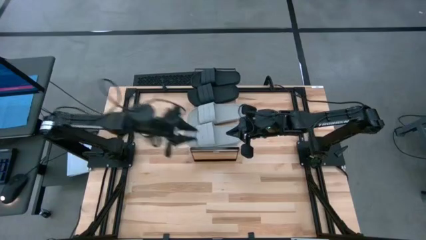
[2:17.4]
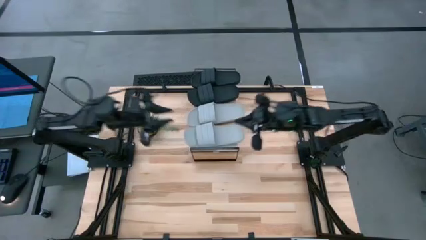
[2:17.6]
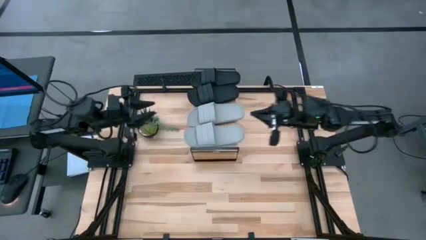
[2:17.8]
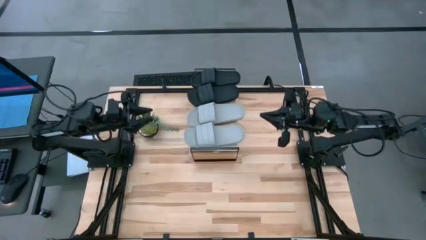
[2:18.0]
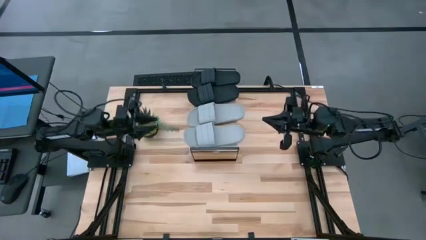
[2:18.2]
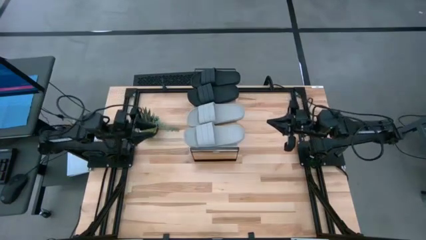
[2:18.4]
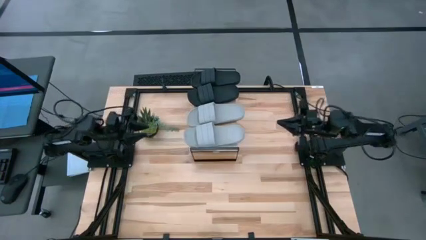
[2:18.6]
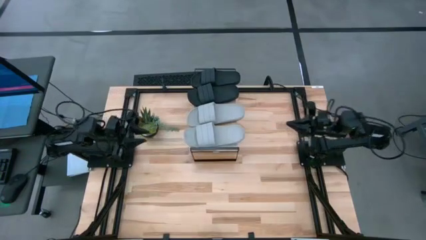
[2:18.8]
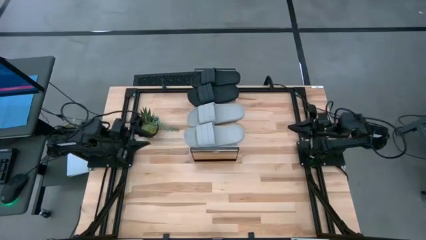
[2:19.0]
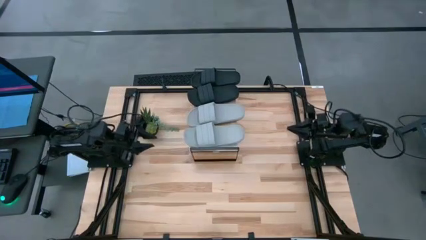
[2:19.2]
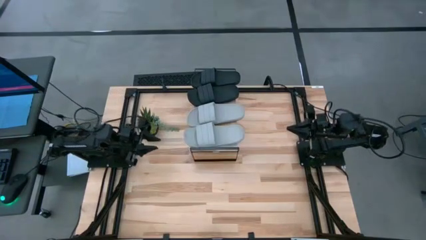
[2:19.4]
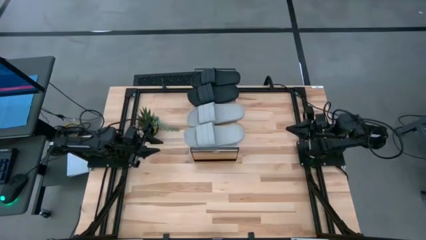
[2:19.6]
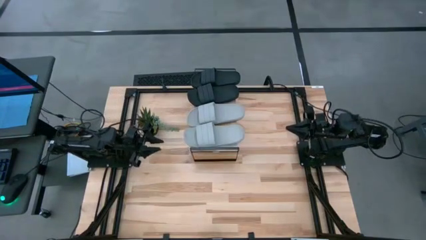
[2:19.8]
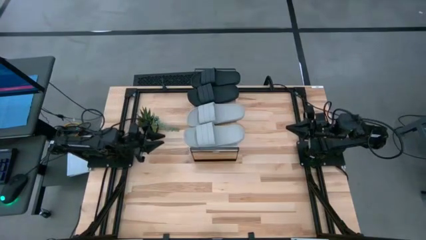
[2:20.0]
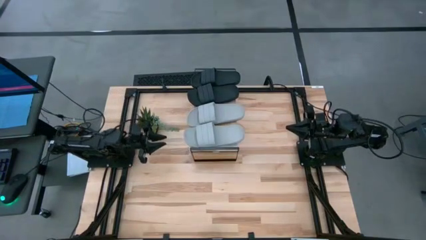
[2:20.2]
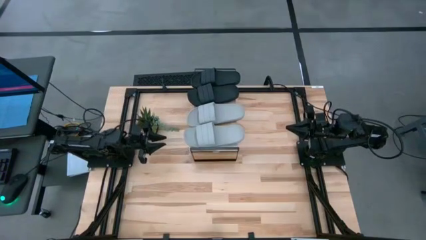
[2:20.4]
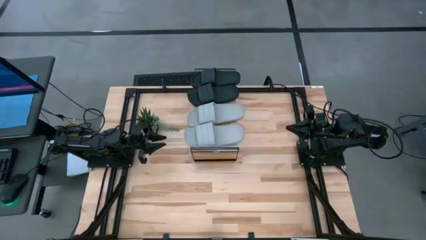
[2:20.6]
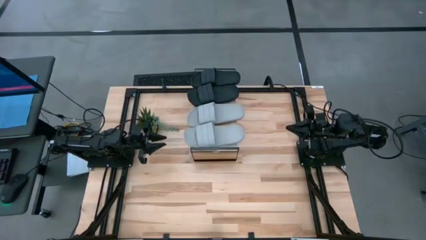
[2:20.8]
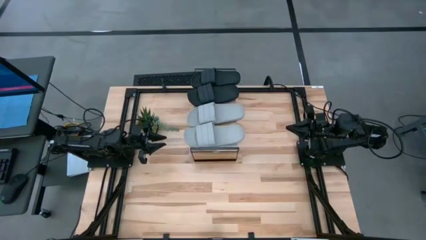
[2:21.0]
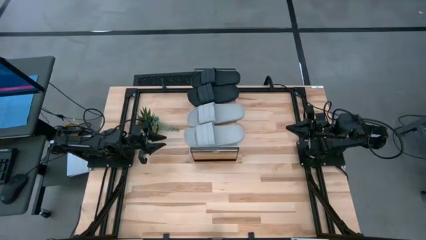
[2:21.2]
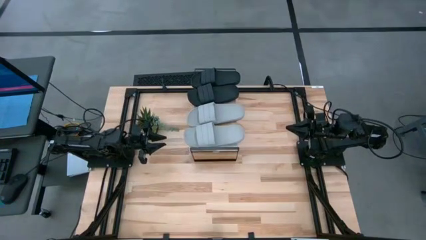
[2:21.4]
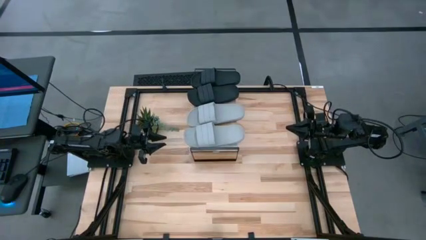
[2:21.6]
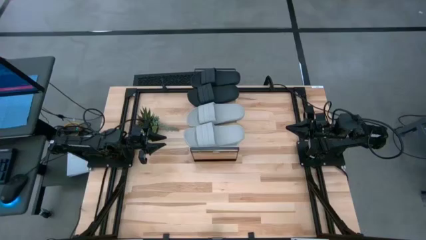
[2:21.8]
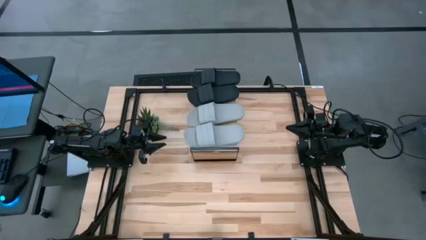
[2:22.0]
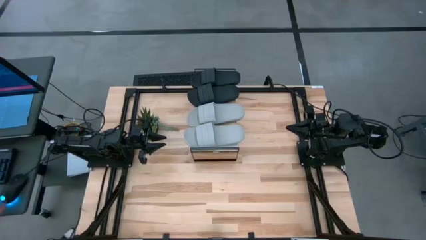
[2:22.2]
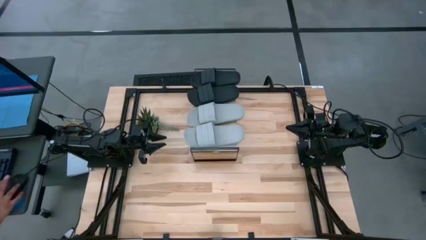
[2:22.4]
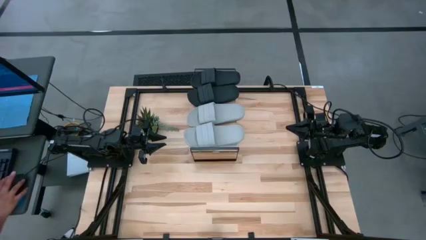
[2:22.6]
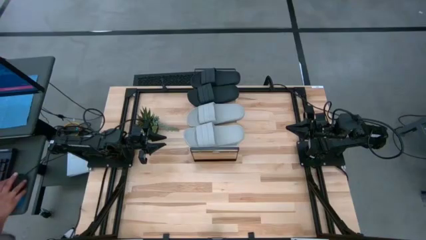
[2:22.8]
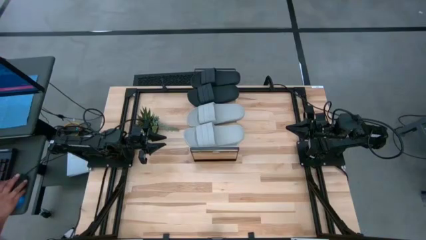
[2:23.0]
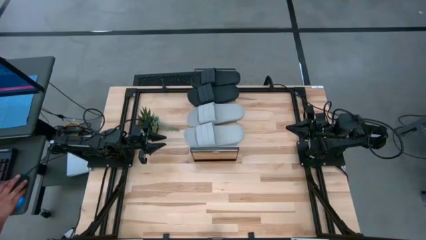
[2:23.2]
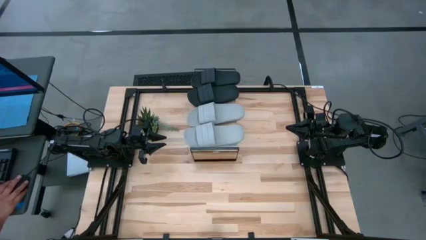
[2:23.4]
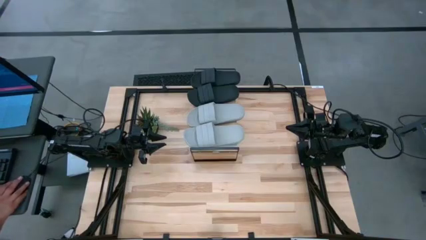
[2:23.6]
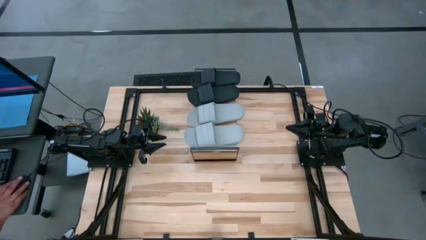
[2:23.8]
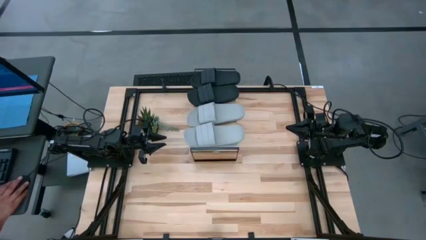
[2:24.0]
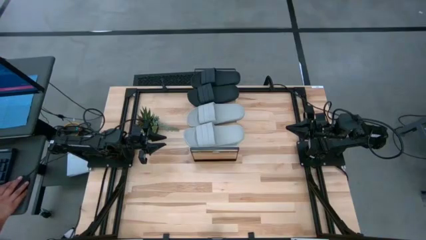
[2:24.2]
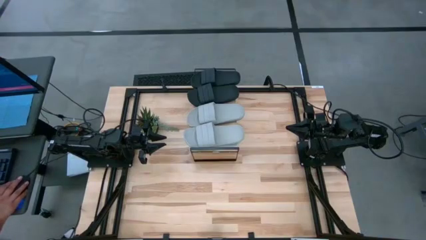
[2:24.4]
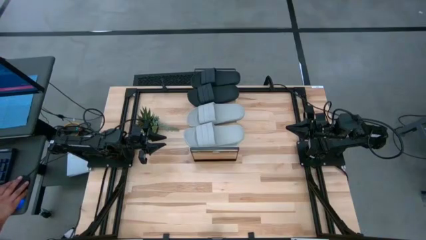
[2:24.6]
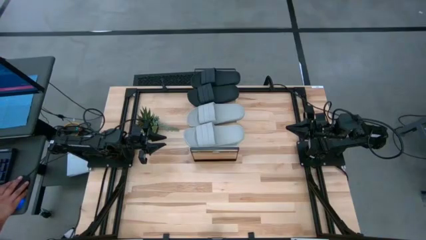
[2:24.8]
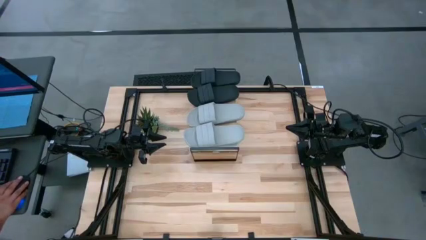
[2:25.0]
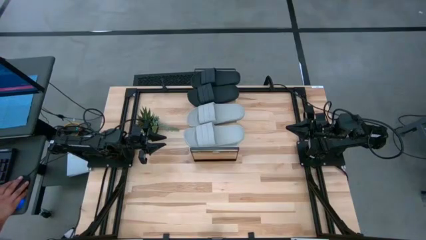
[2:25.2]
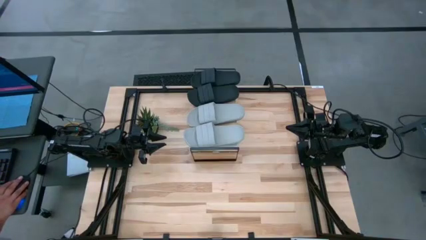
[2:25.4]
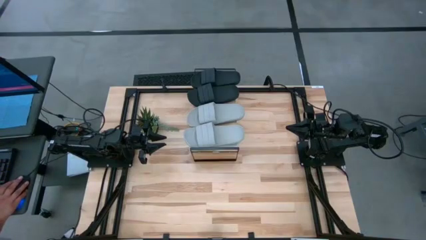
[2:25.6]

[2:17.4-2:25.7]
Task: Pick and place slides into the shelf
Return to Home Position

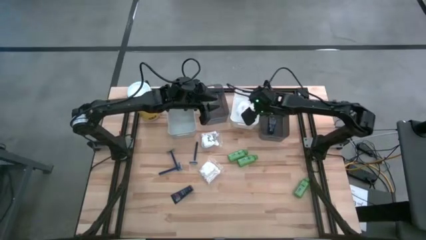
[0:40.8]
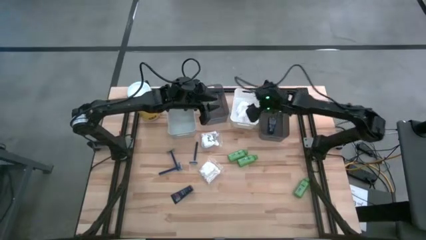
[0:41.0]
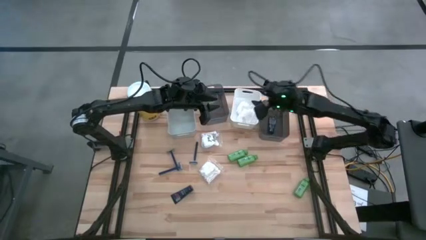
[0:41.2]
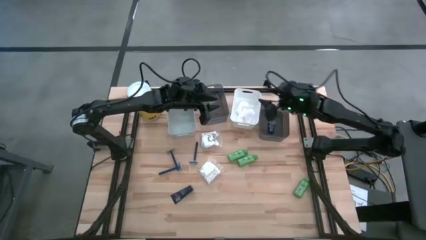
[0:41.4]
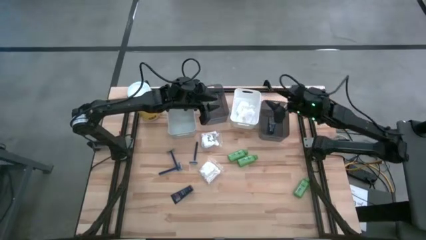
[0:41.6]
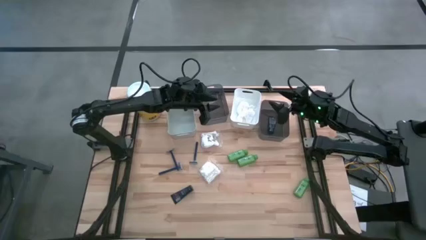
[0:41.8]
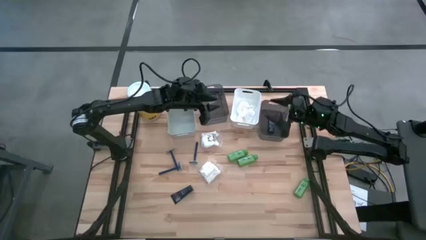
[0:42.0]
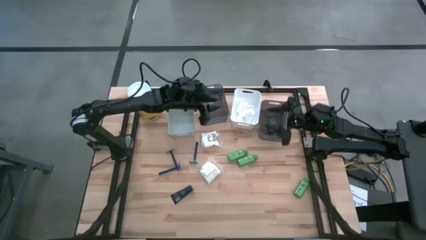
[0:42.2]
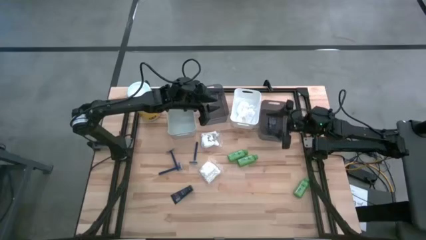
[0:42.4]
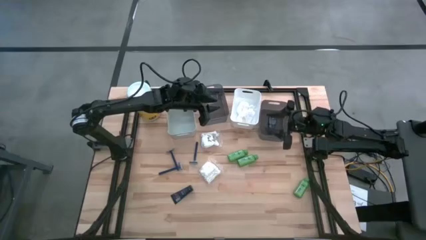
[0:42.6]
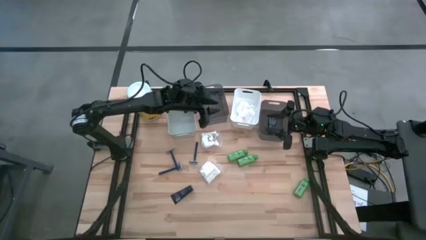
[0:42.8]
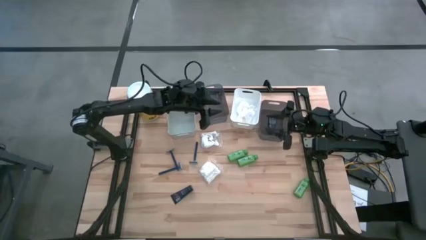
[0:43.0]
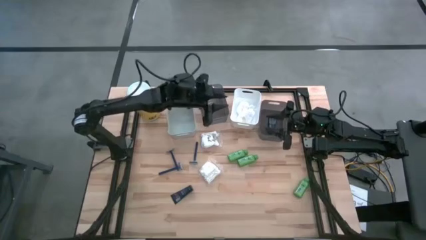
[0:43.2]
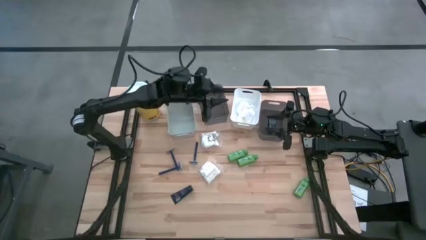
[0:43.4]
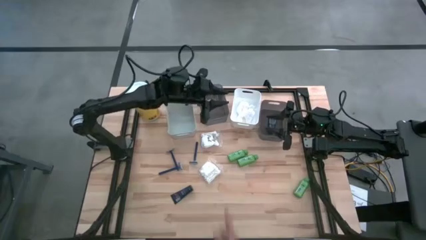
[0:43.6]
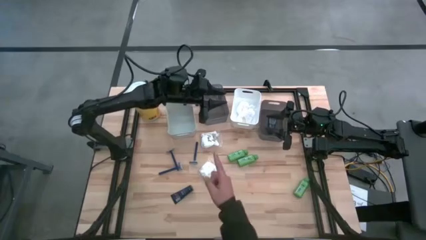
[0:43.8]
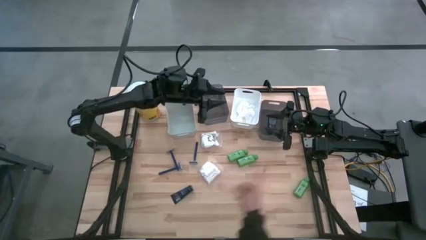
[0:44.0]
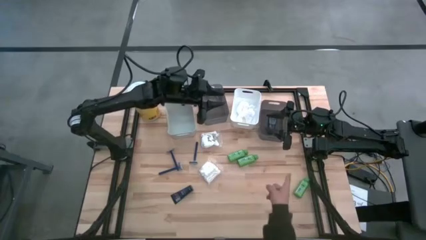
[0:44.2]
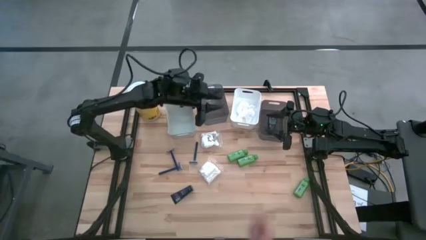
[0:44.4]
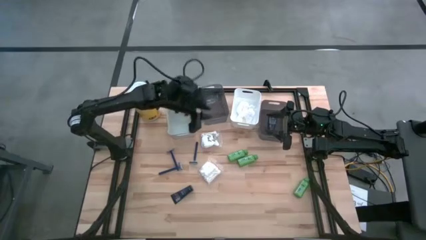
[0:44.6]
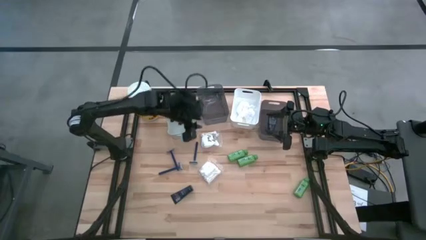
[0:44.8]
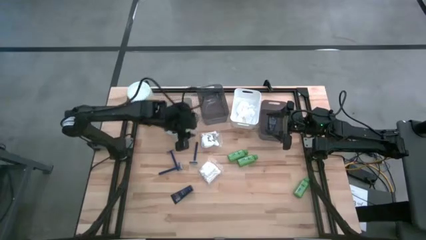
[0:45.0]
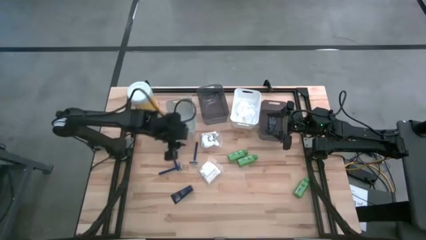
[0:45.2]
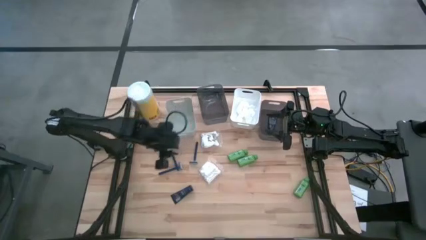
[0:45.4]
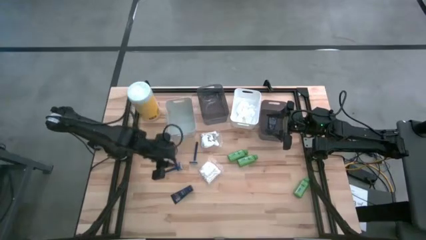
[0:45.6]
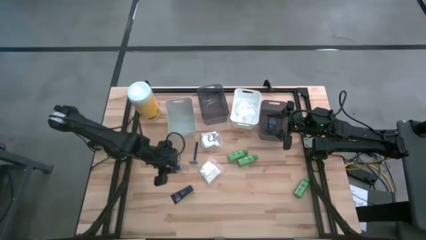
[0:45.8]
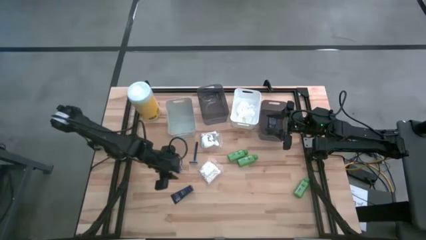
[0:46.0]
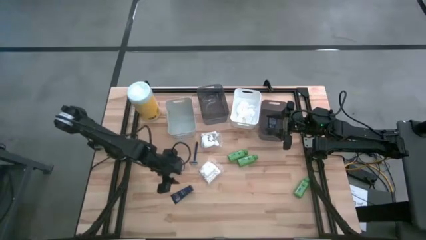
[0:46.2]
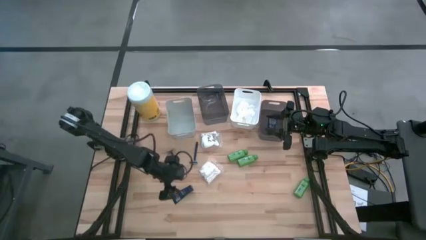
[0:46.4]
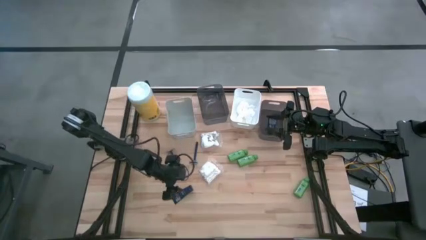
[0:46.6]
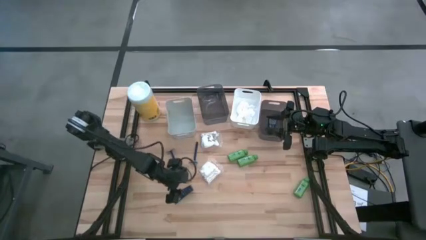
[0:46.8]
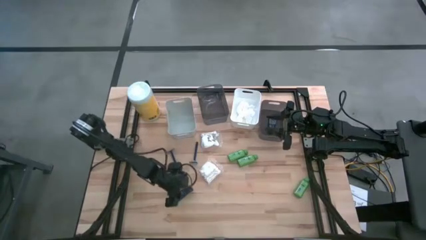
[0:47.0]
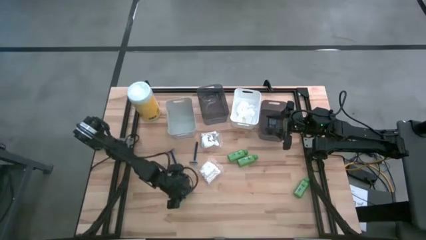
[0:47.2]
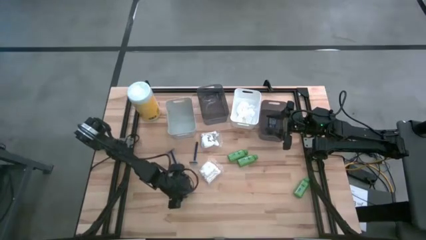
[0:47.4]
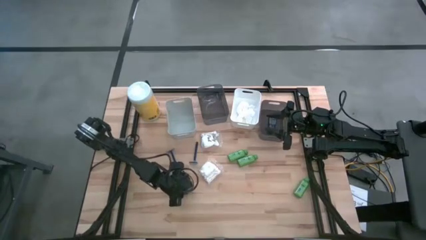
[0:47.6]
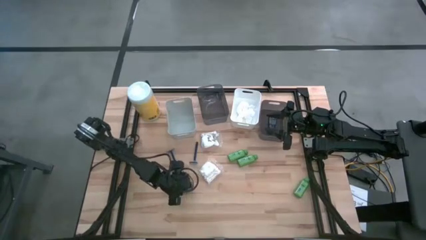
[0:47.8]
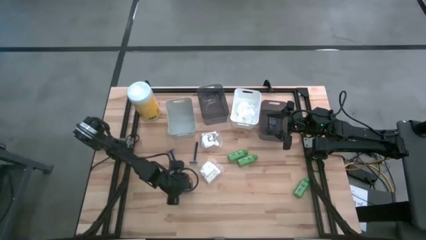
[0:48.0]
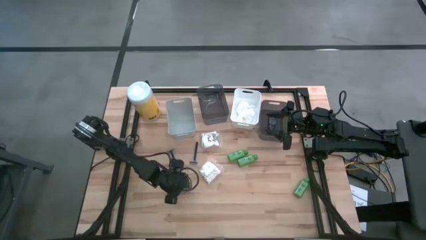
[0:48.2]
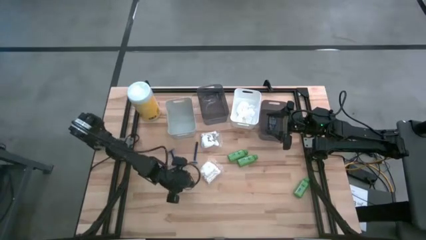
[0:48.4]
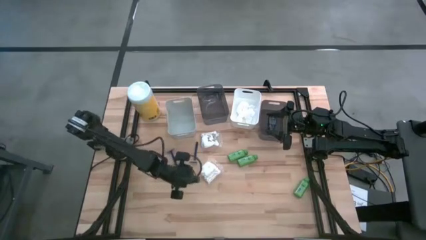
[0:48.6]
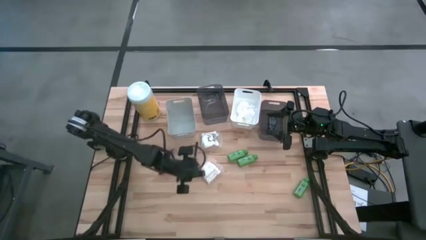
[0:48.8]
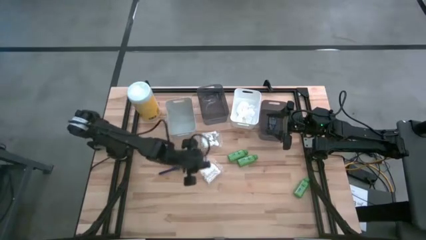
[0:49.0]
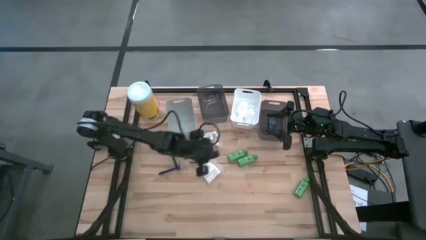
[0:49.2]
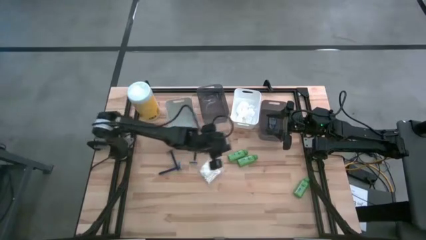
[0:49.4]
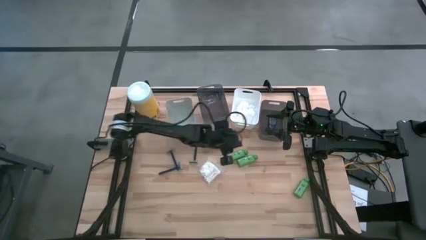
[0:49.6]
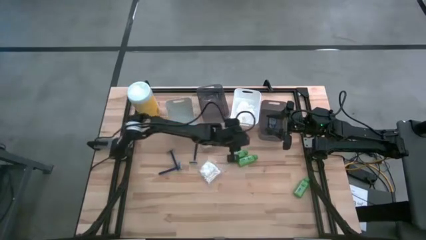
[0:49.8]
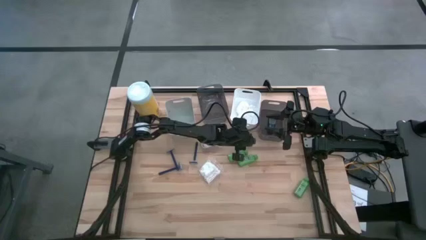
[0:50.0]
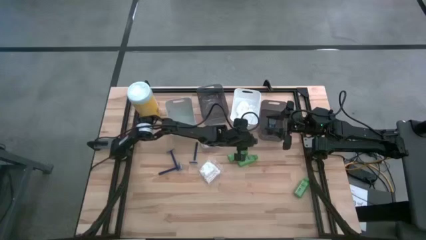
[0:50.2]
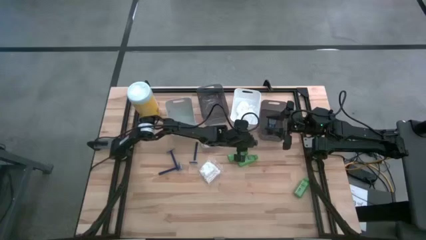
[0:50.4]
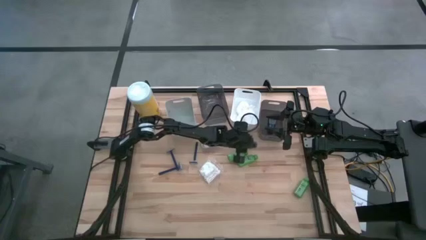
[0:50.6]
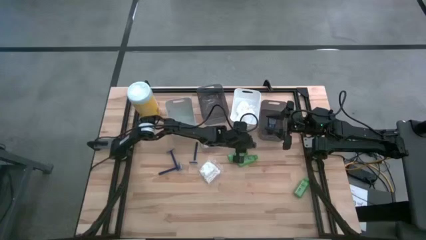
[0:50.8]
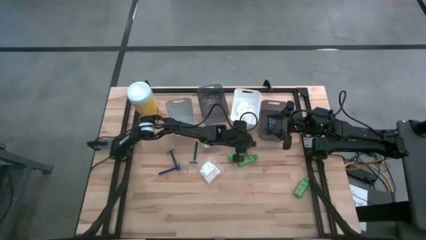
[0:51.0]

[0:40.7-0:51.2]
Task: Pick & Place Travel size toiletries
Move the blue shave cream to the top of the green shampoo
